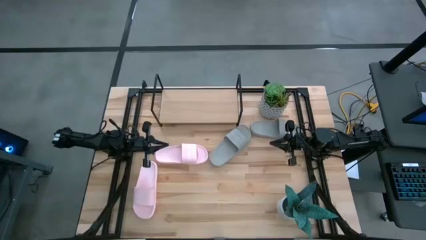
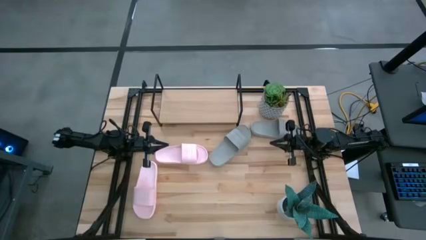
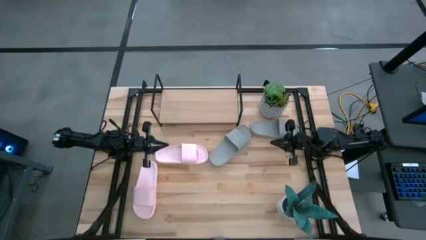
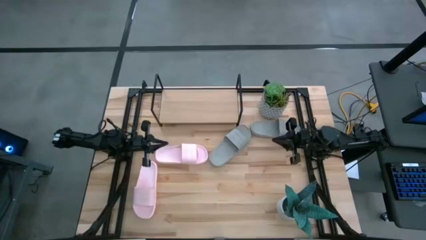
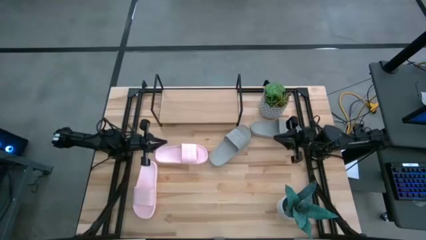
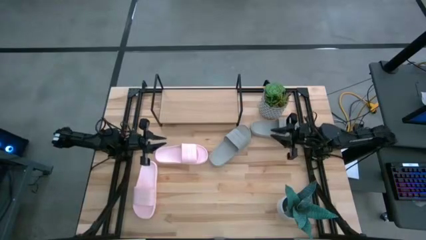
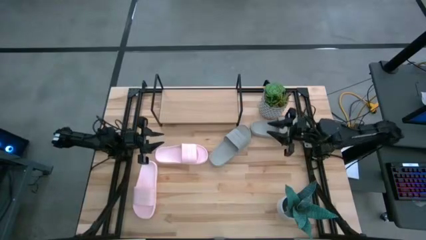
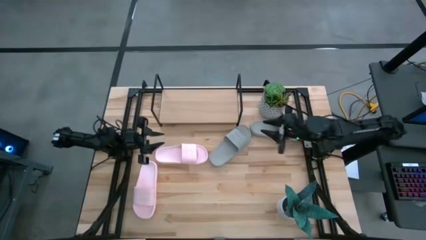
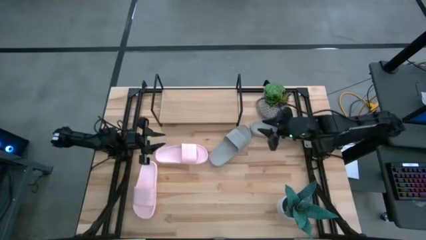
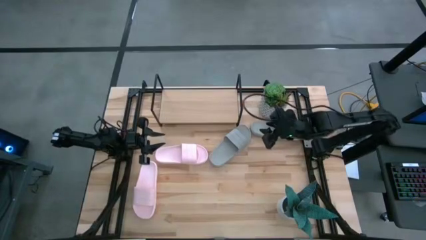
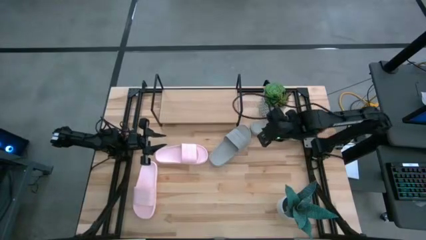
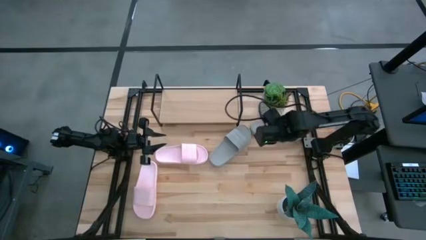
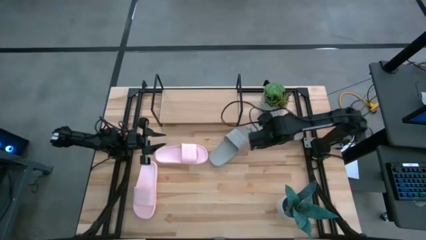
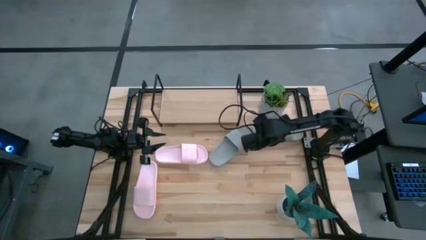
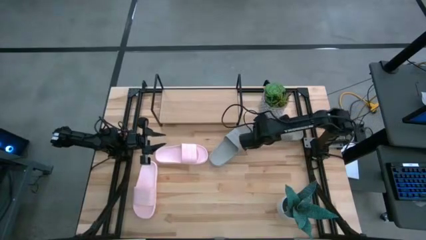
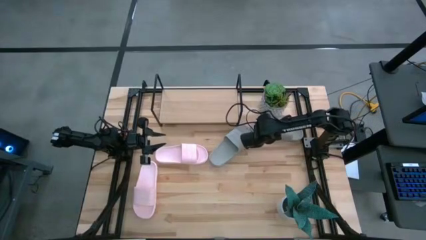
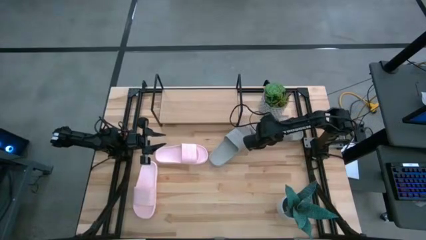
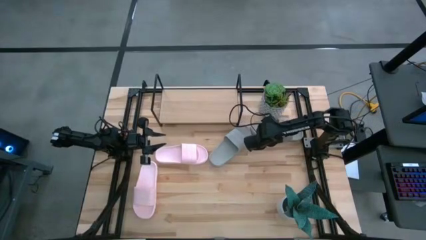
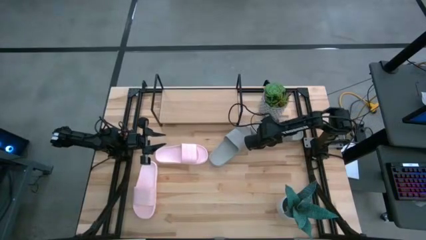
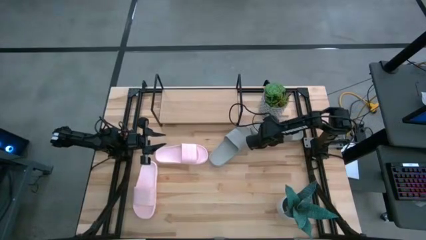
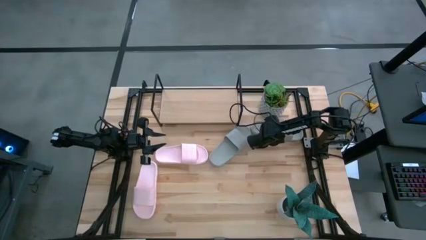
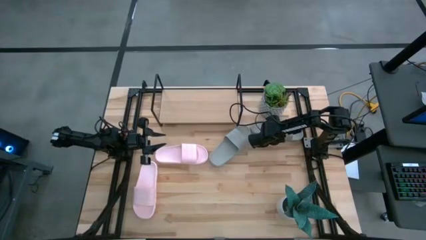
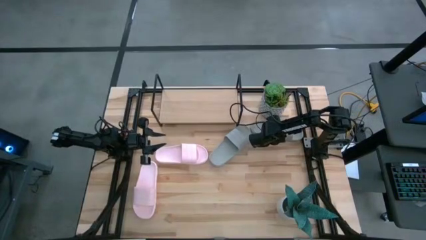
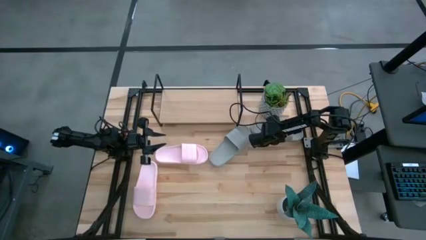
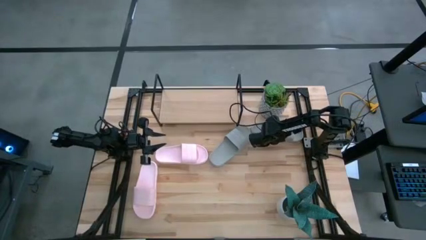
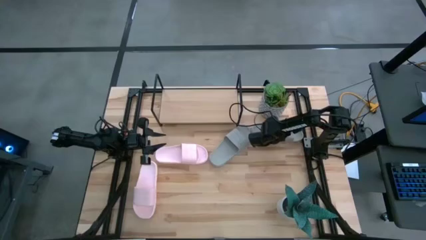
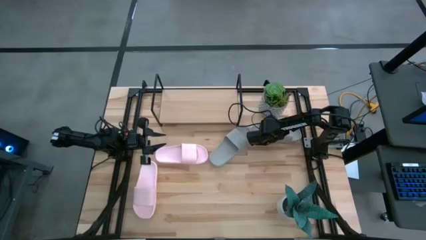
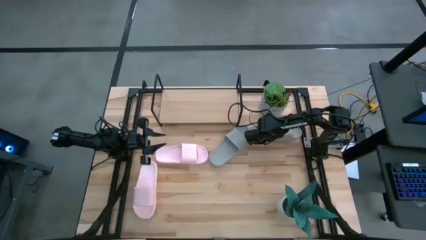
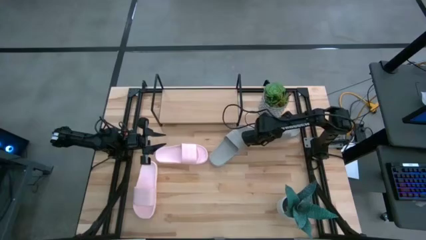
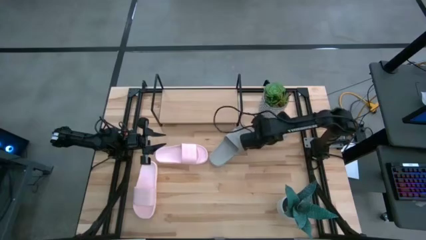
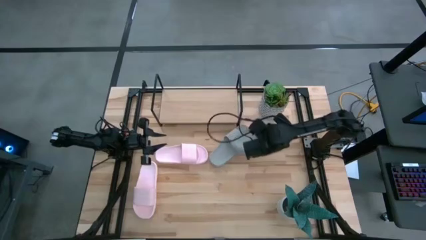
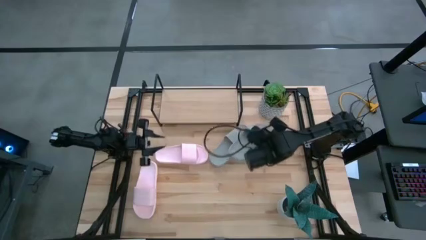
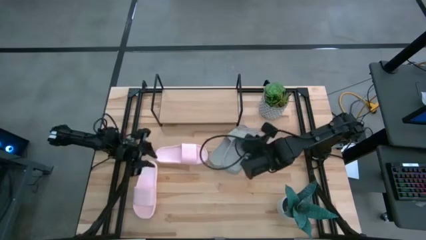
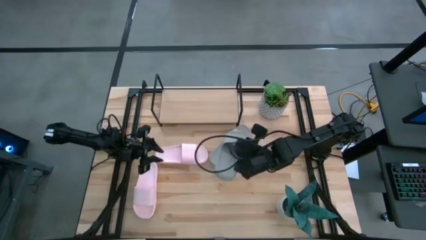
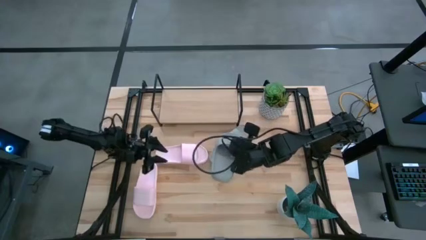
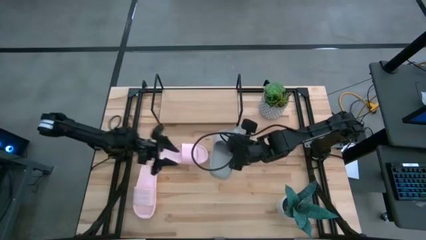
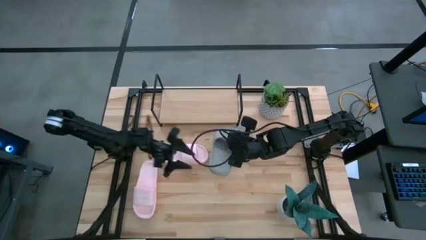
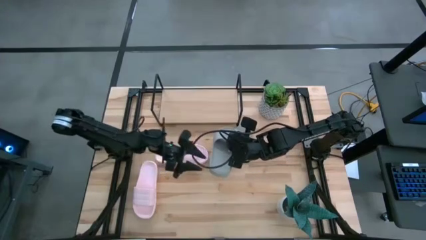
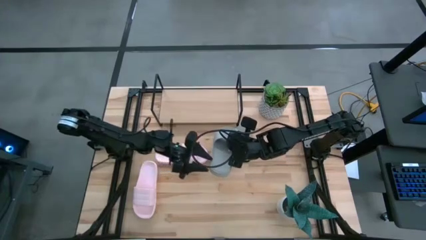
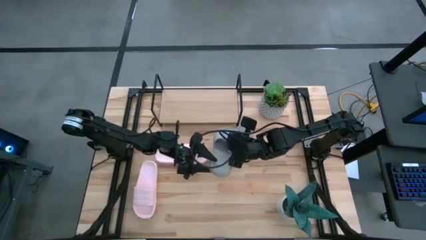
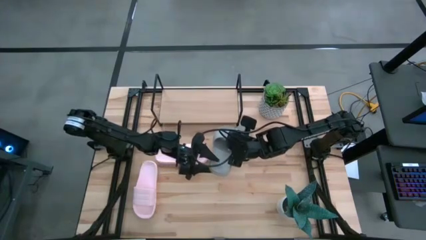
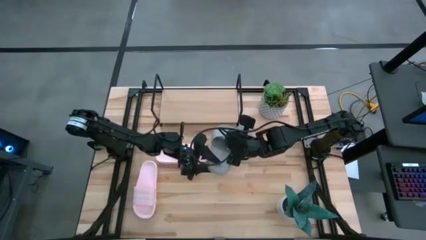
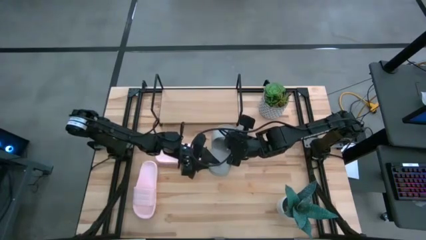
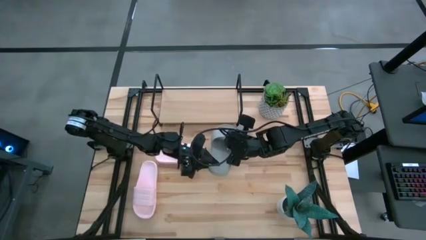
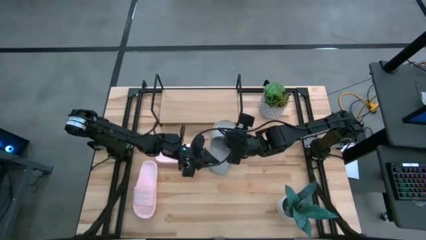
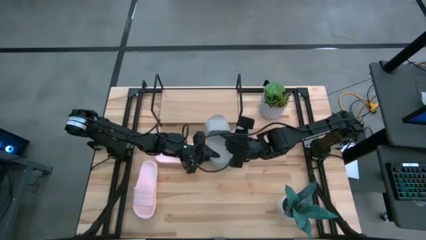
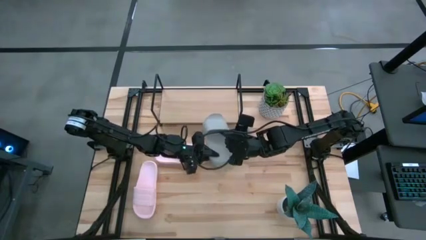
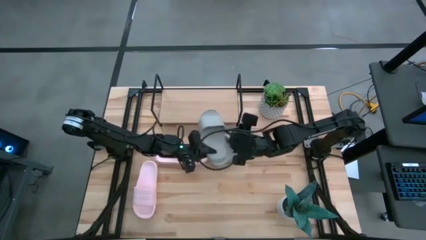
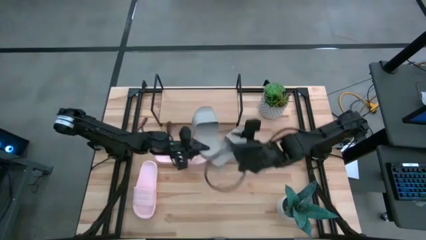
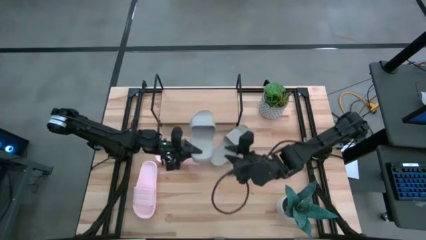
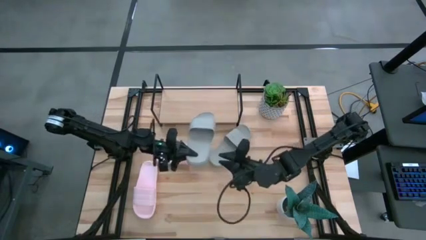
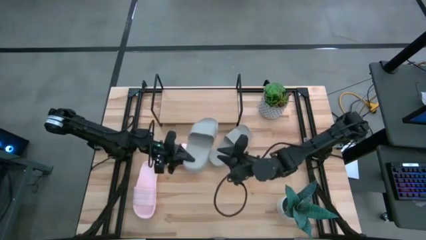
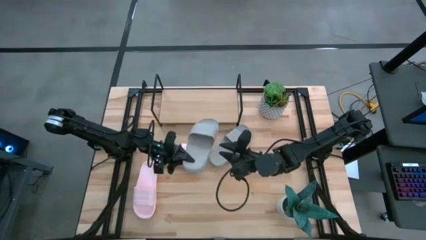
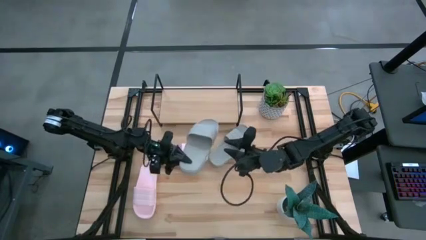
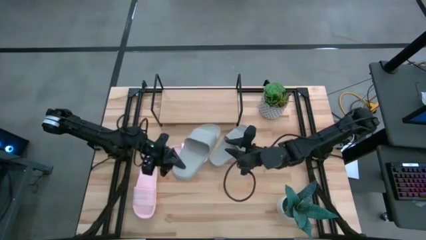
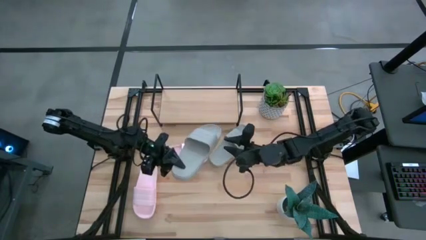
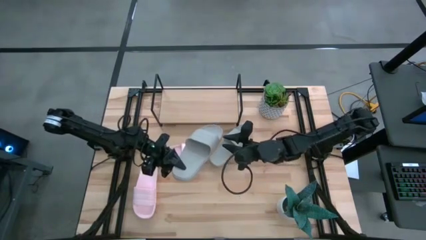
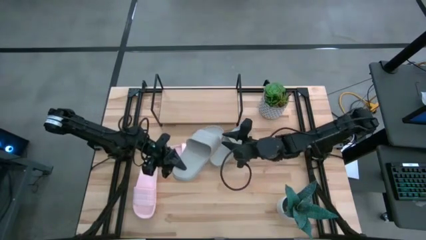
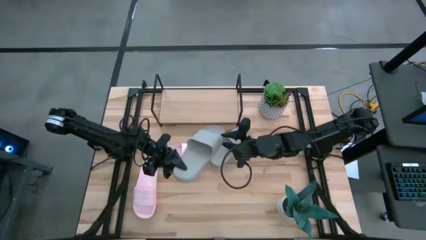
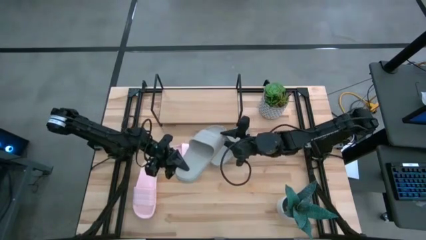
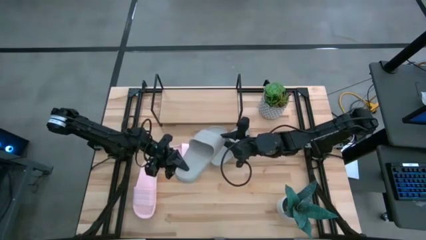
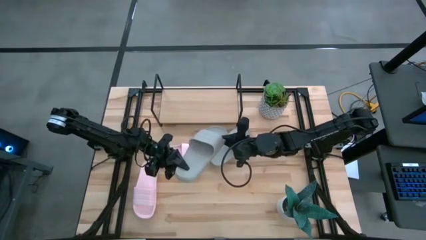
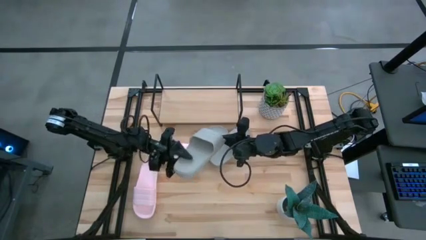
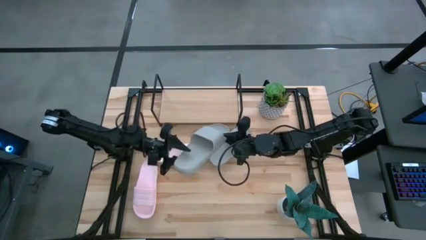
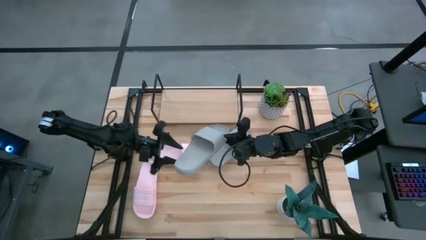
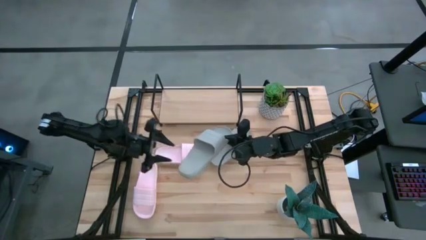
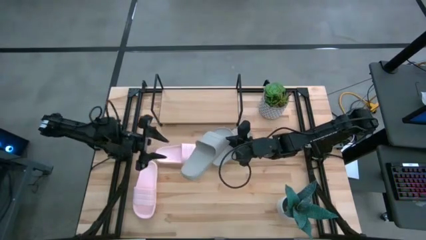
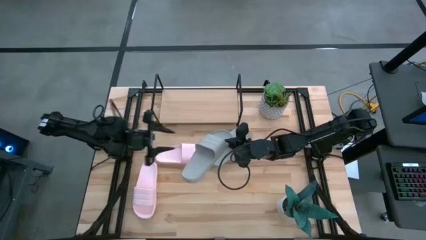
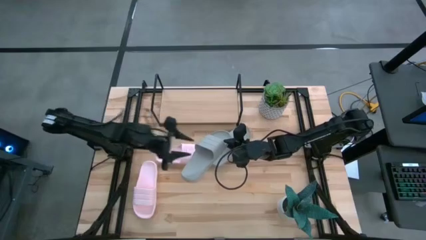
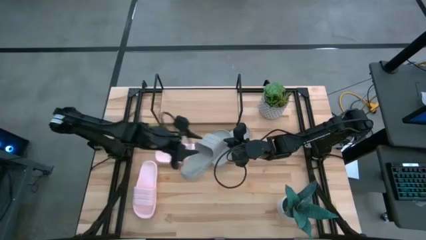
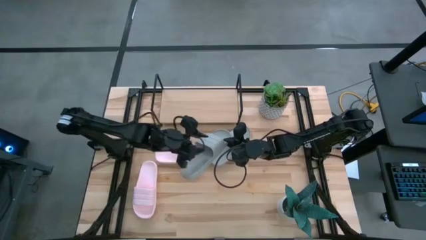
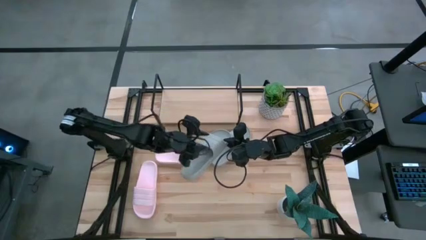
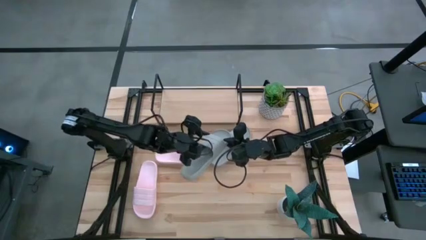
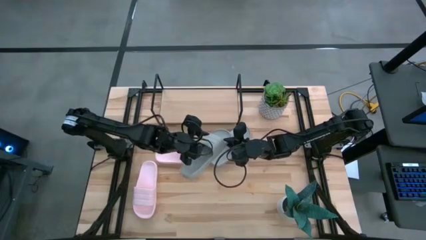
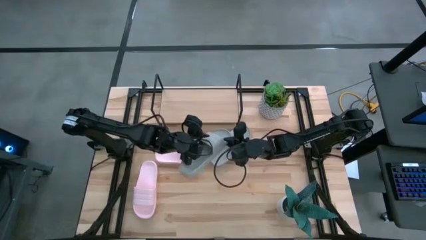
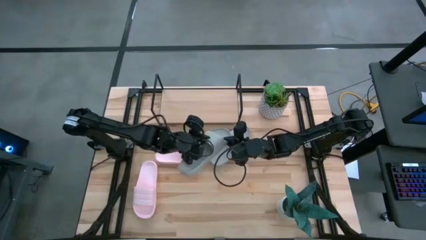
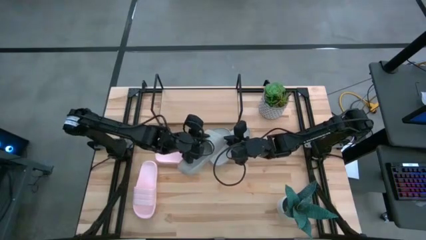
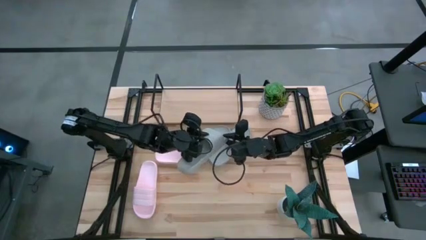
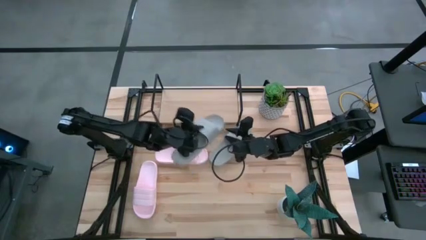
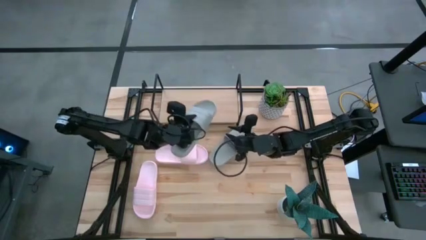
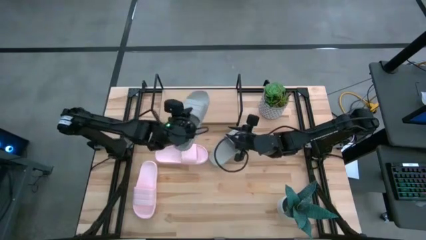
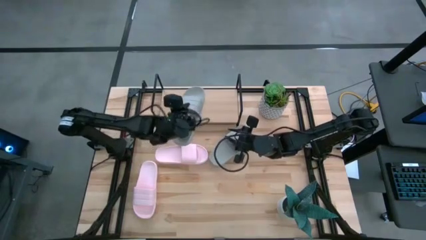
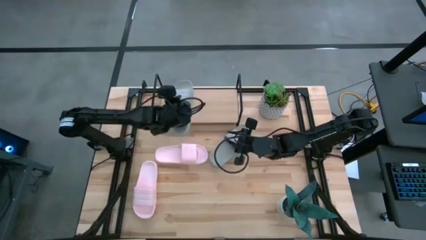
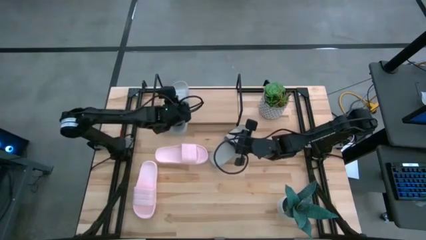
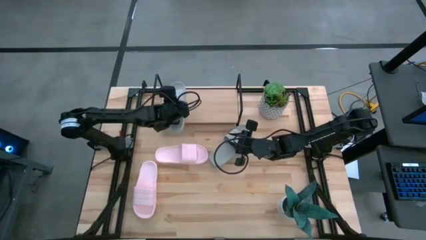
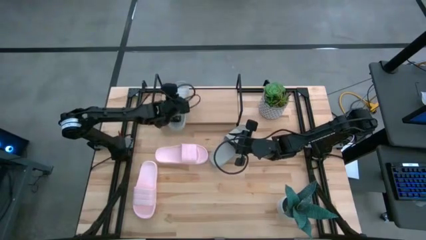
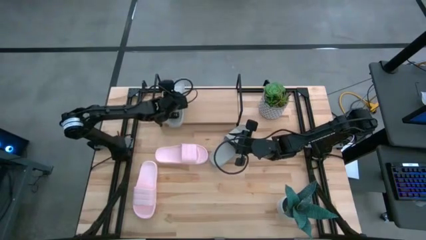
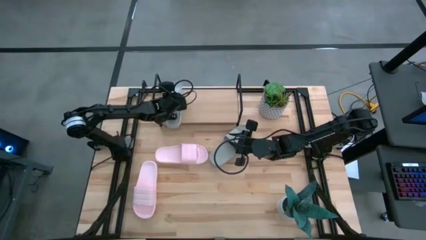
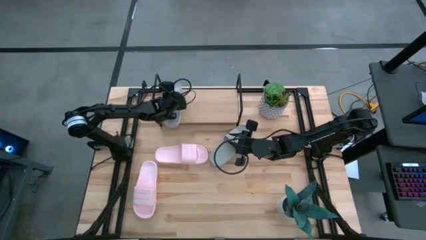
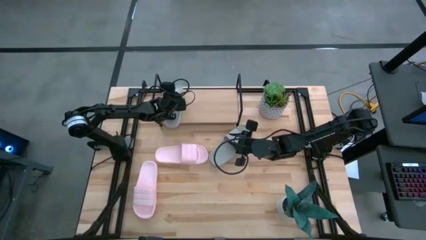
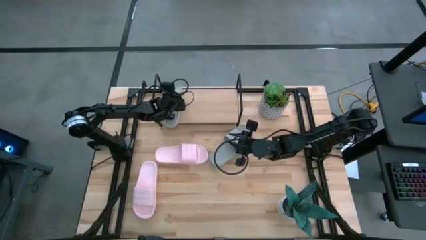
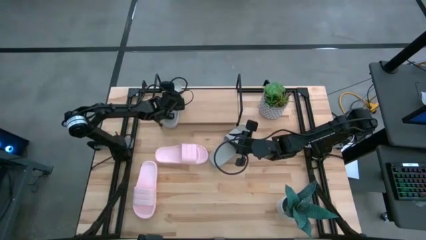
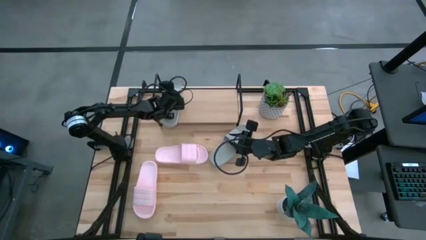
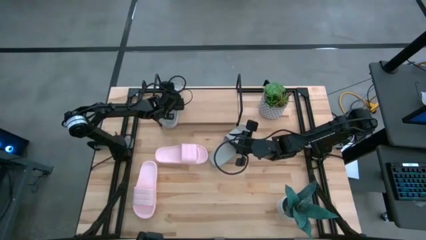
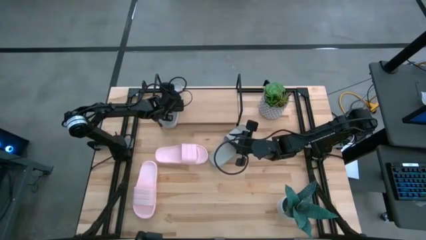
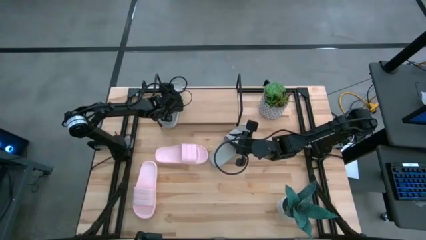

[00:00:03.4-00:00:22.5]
Task: Pick and place slides into the shelf
Put the right gray slipper on the shelf
